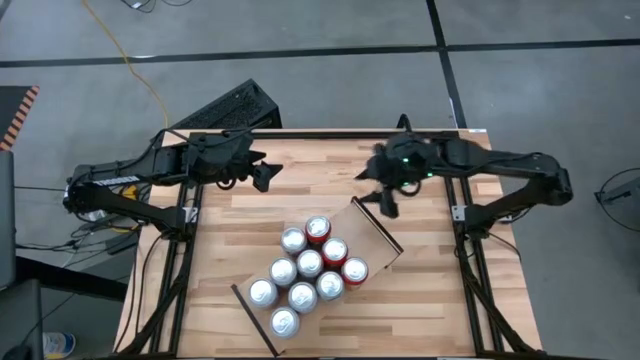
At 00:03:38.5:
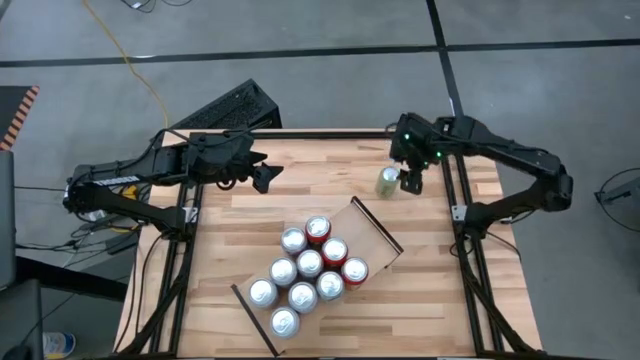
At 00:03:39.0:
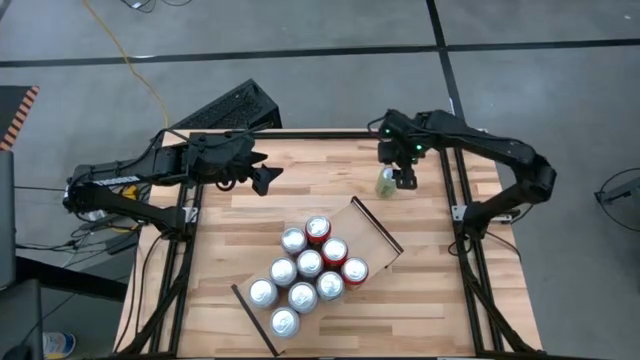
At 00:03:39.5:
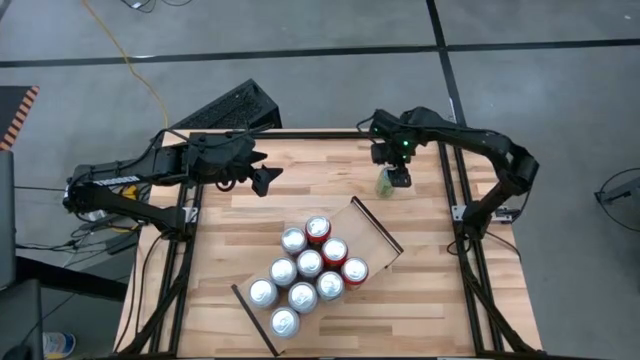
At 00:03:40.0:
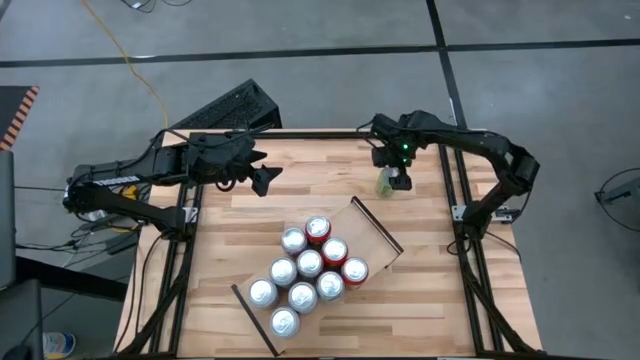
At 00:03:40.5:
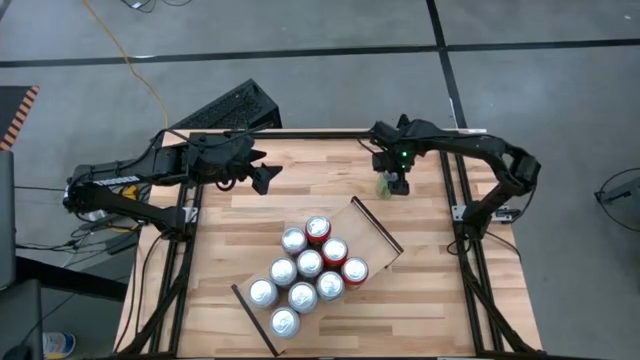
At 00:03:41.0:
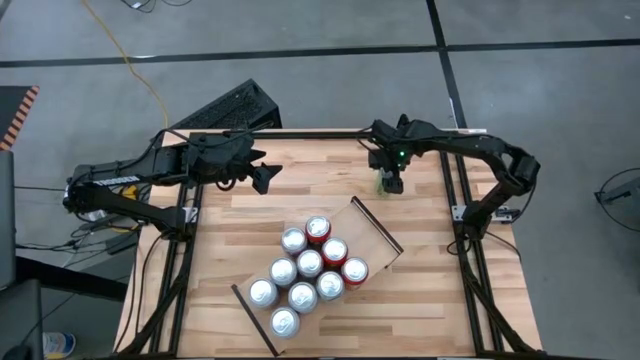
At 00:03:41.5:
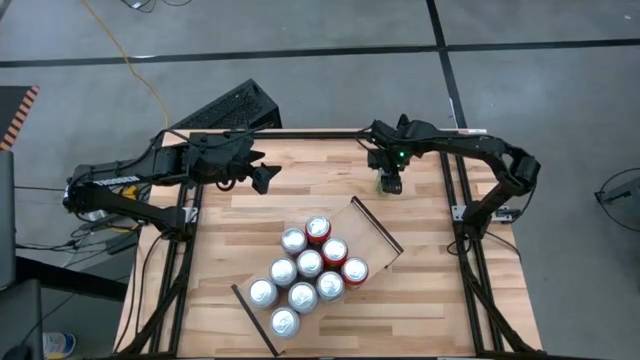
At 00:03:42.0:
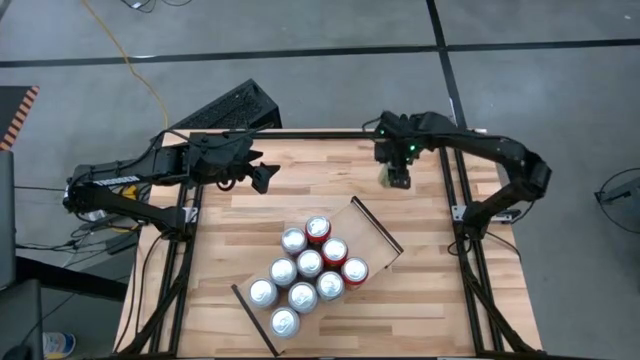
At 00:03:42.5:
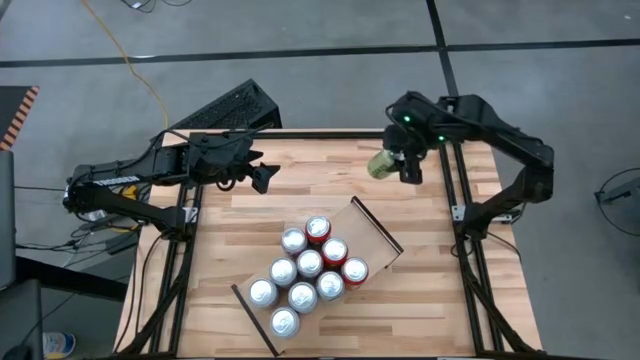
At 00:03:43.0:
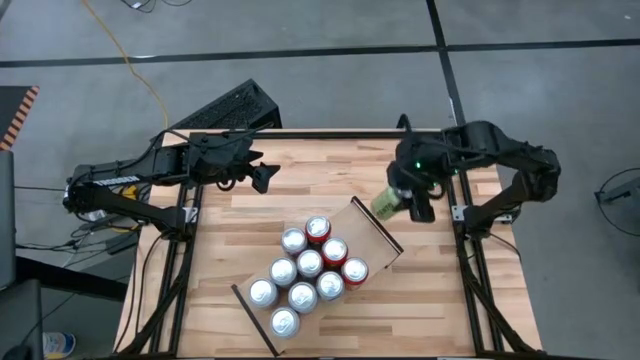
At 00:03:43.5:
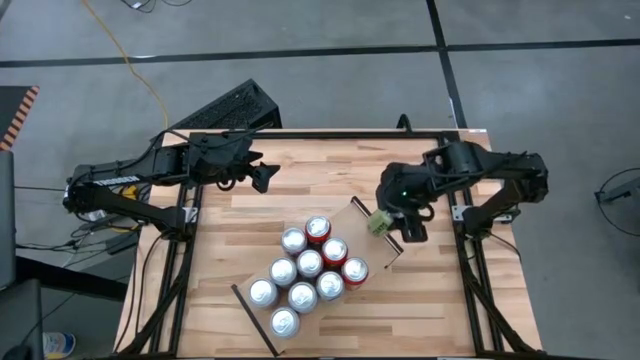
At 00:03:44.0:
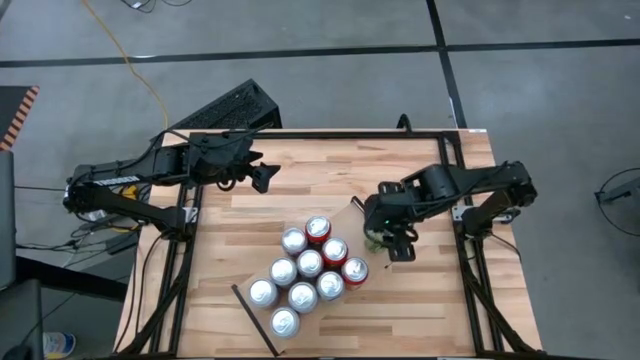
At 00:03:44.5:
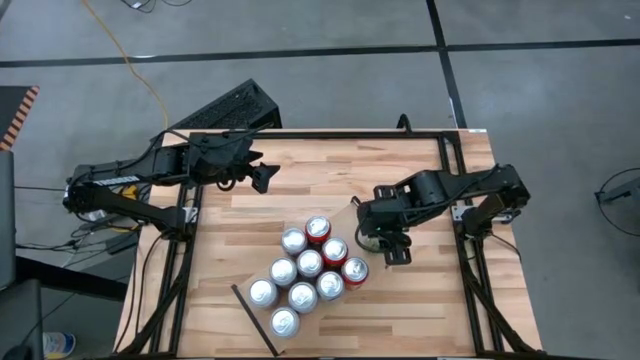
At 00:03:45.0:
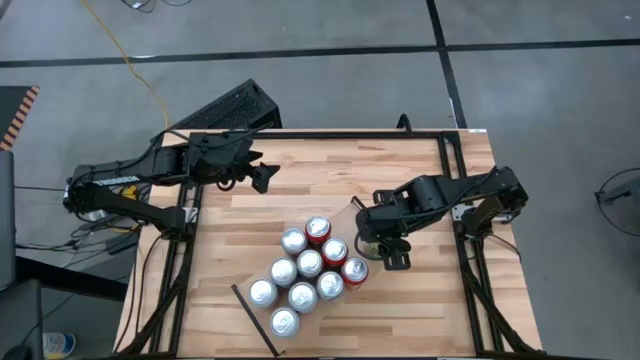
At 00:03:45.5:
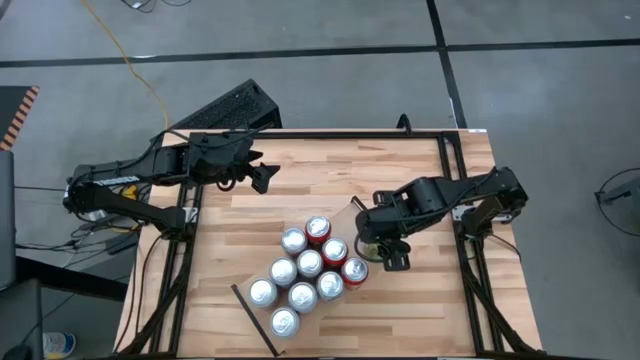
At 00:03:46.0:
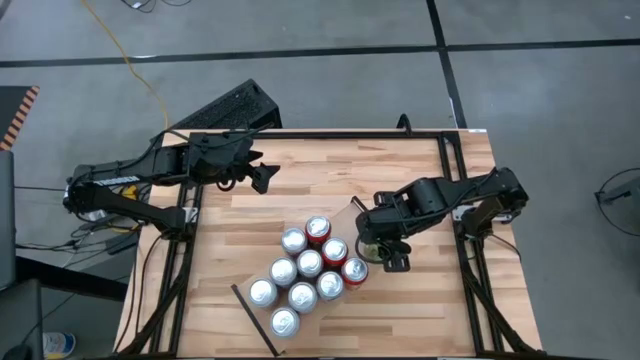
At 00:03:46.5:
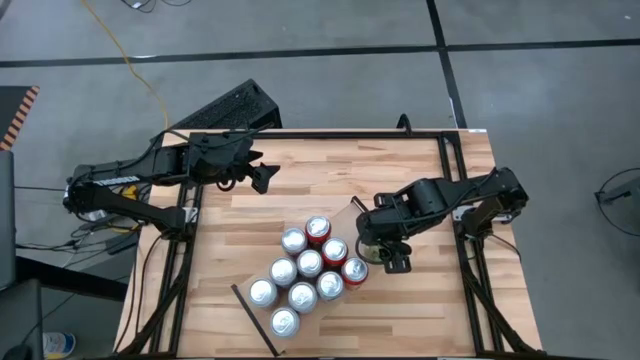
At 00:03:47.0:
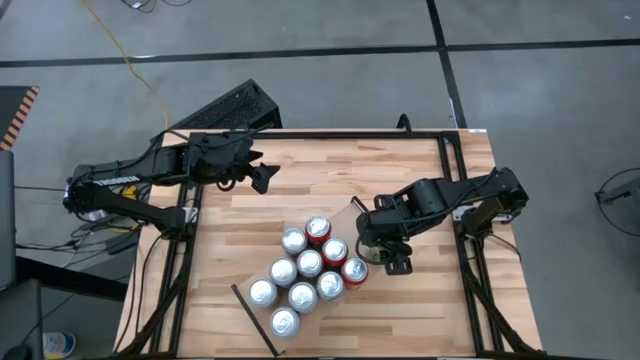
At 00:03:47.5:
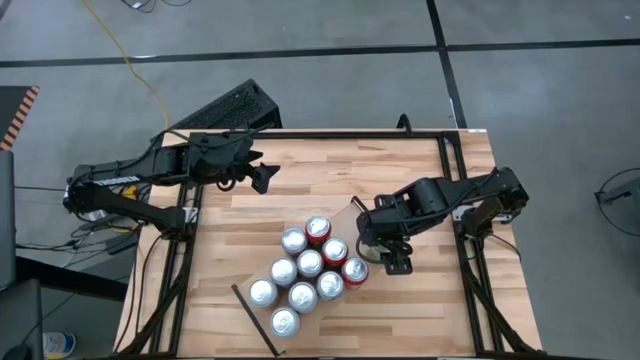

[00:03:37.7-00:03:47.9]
Task: Place canned beverage on shelf
Put the green soda can on the shelf

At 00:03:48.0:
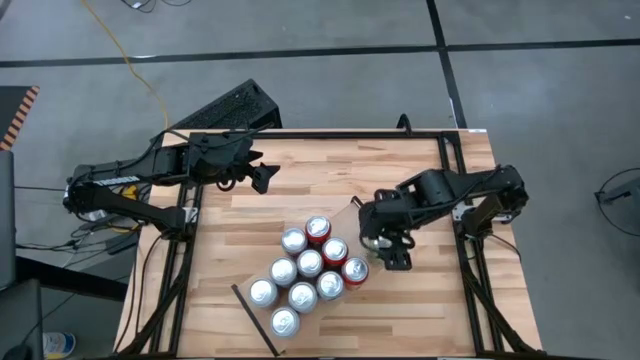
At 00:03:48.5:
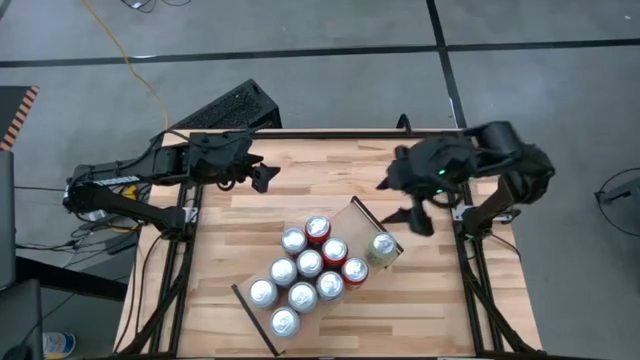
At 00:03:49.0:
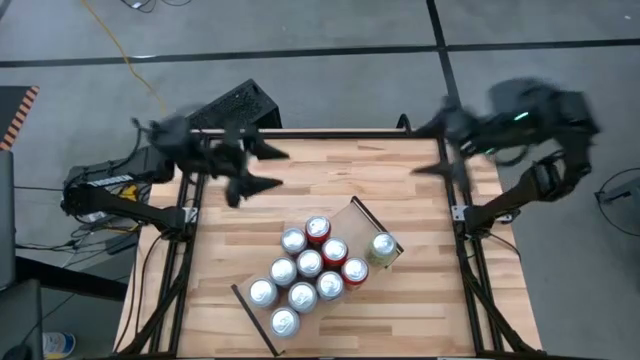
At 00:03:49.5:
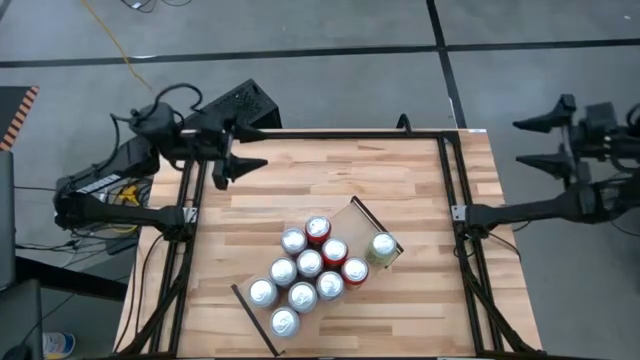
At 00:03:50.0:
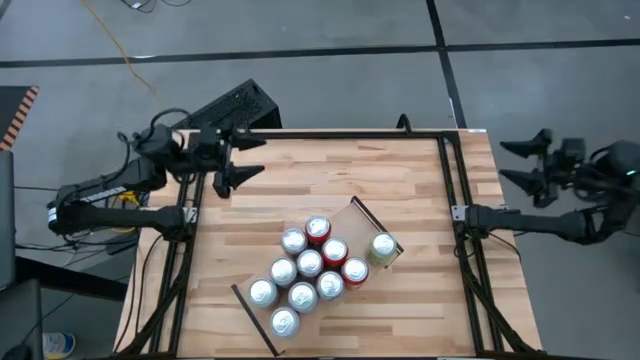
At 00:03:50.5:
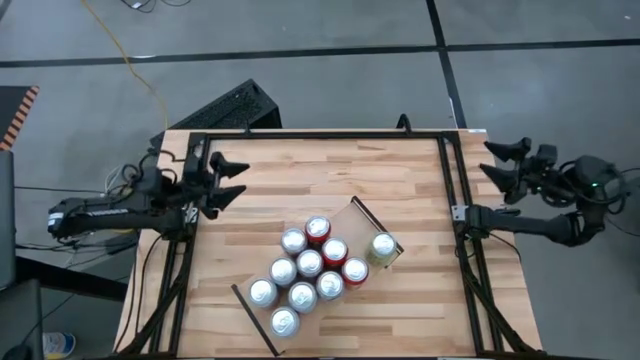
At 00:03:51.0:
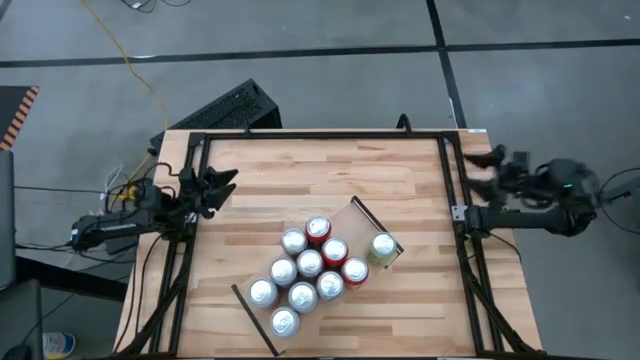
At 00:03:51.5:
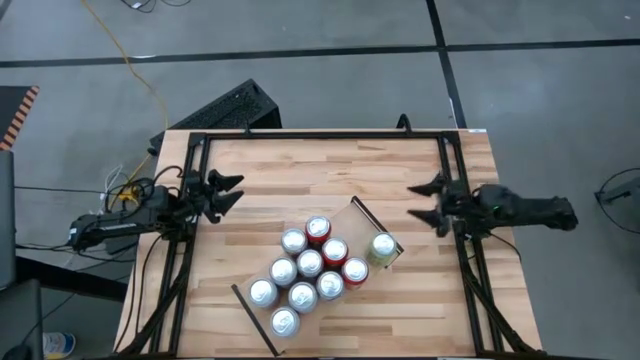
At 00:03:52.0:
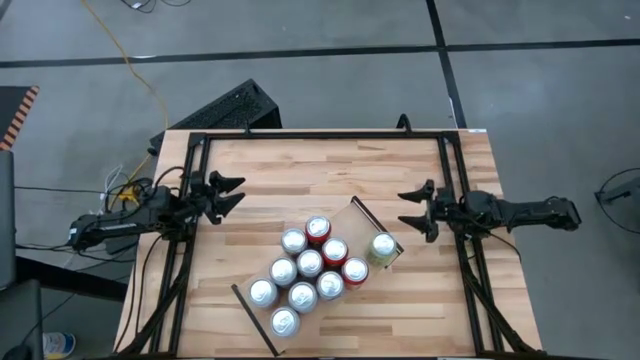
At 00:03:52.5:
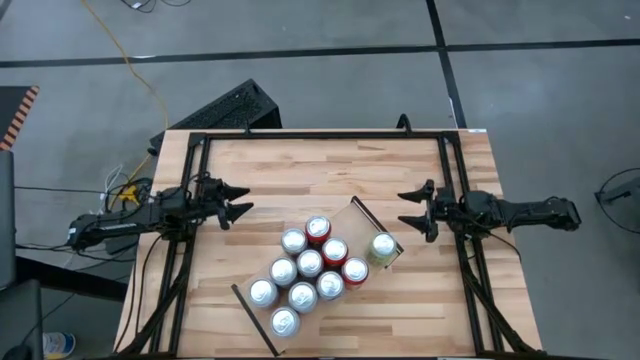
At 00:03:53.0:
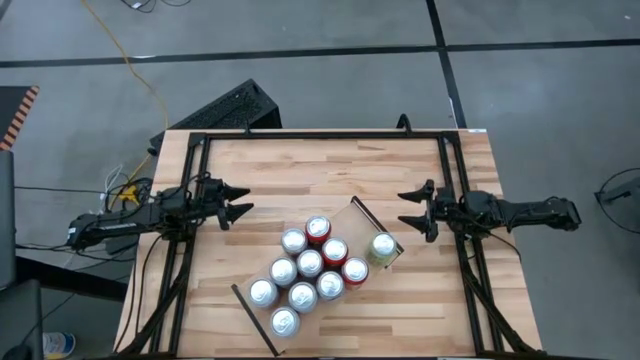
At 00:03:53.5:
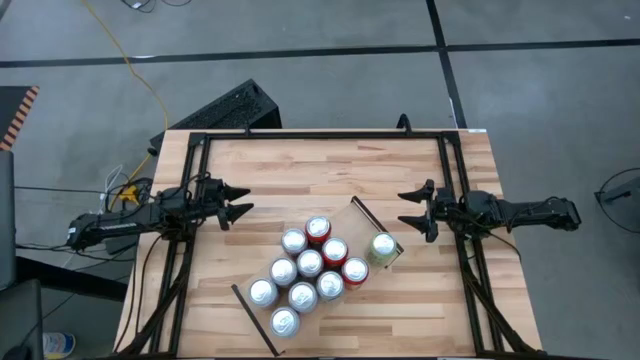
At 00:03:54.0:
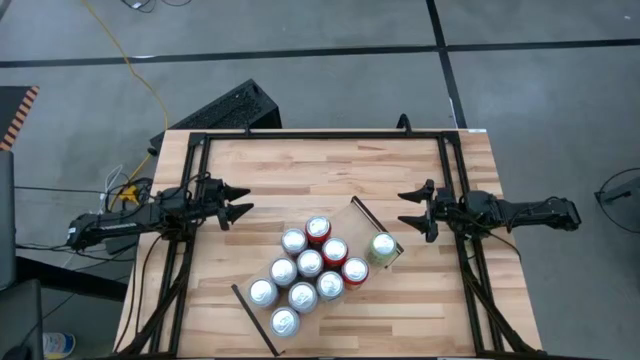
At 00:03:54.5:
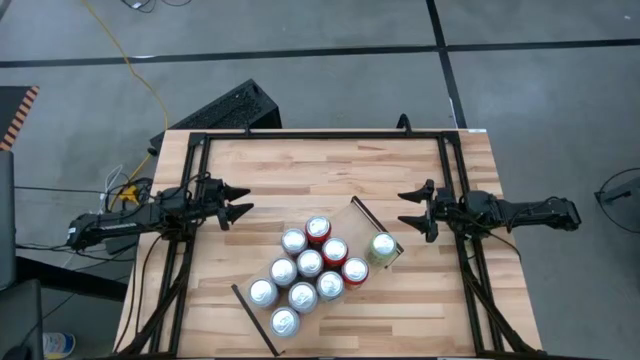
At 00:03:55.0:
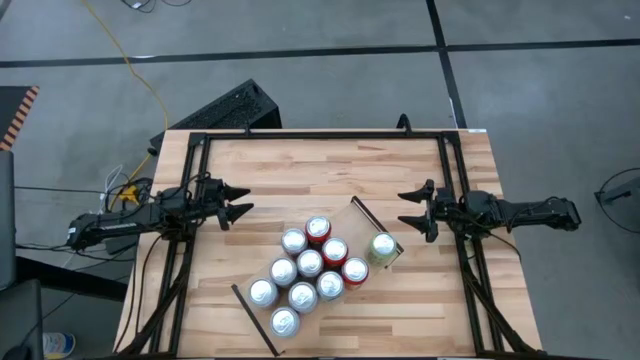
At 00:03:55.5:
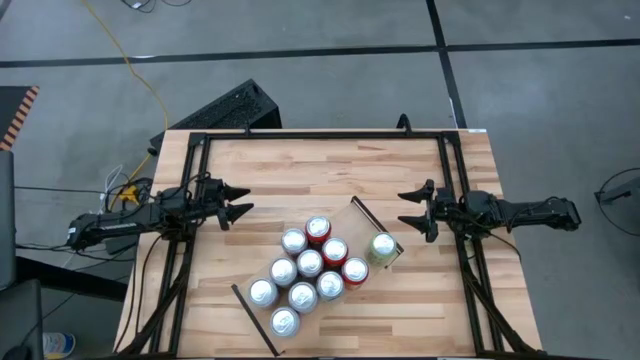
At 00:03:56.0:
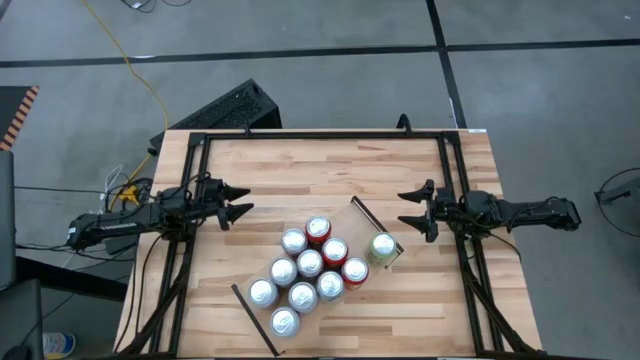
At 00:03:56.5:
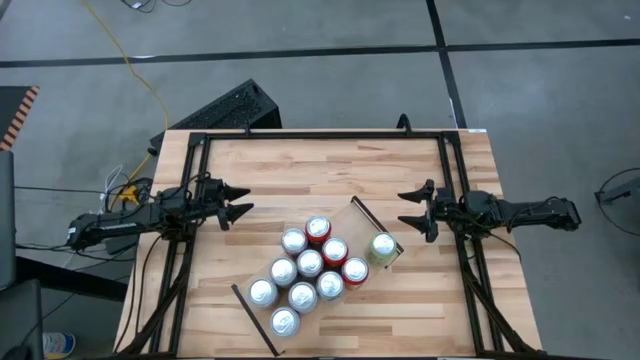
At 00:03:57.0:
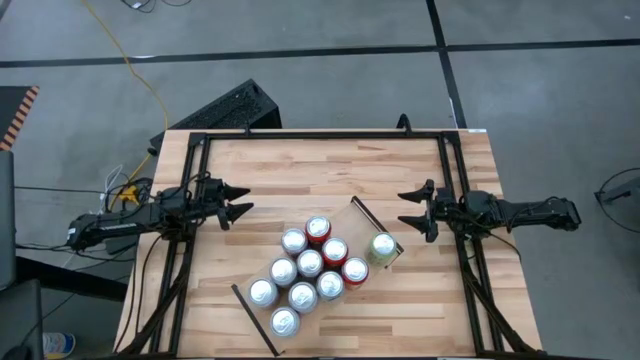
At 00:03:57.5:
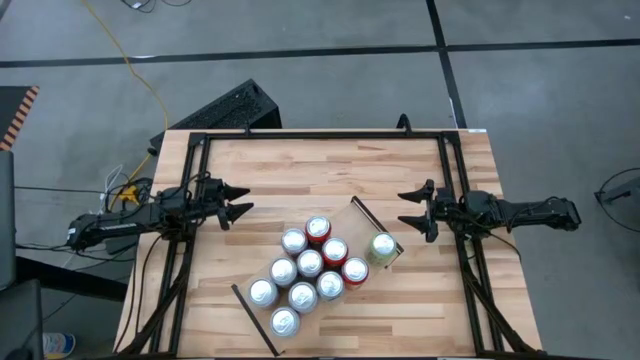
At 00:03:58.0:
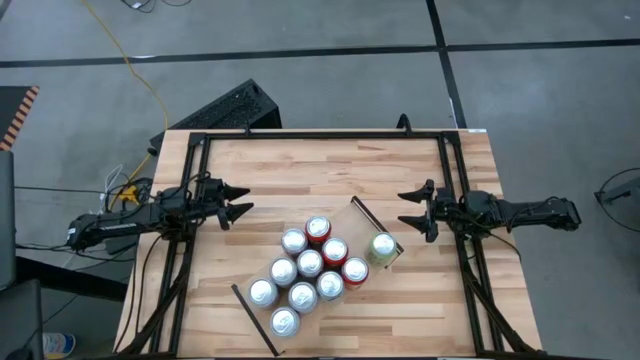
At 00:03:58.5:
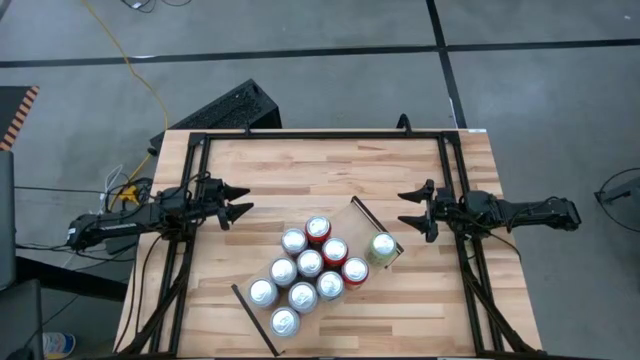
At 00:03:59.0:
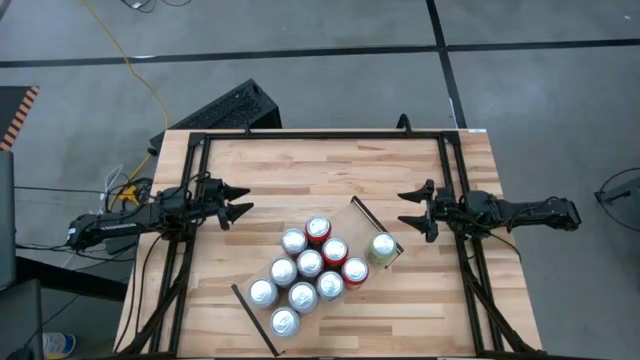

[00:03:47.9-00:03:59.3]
Return to Home Position
